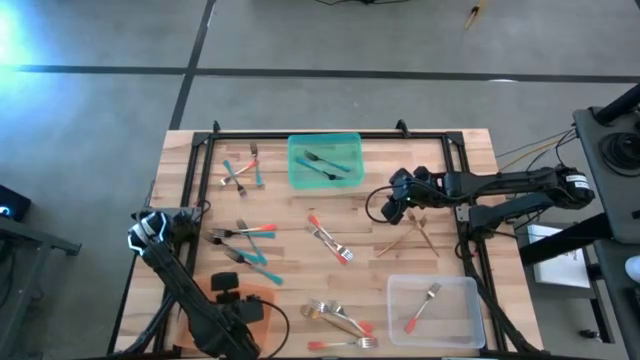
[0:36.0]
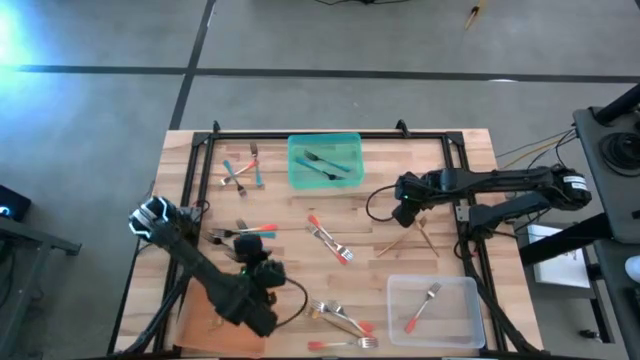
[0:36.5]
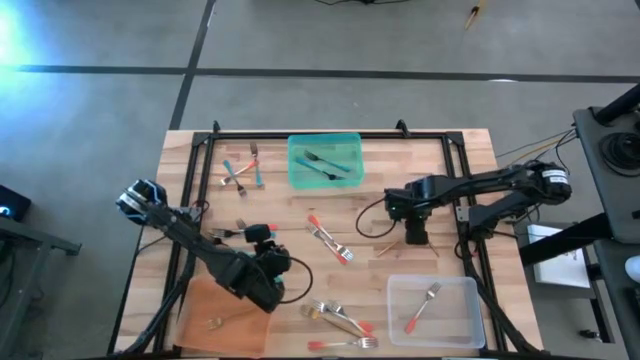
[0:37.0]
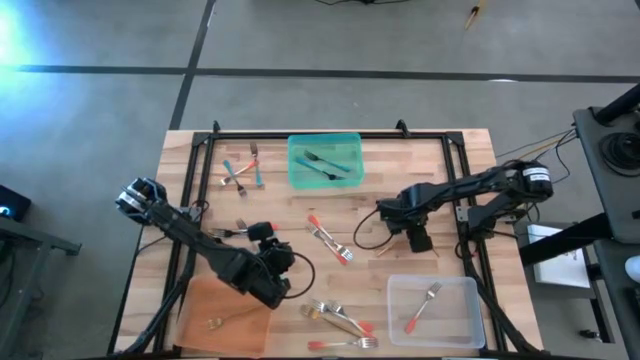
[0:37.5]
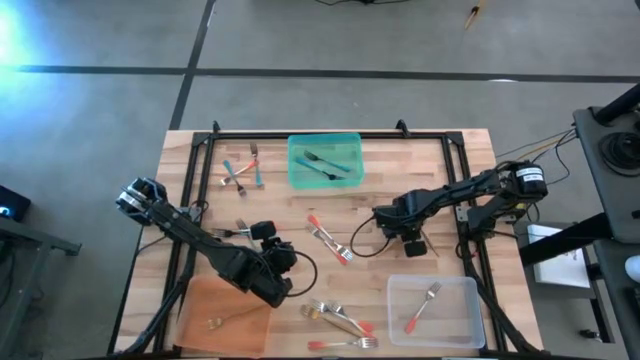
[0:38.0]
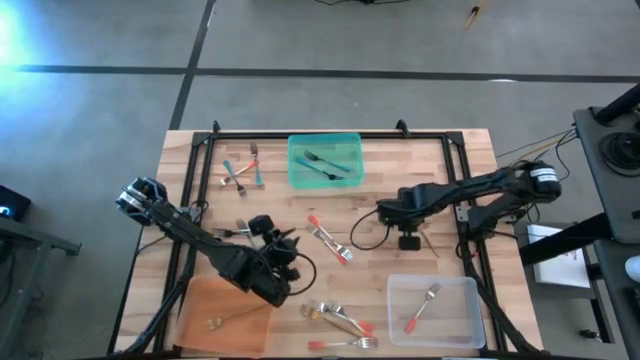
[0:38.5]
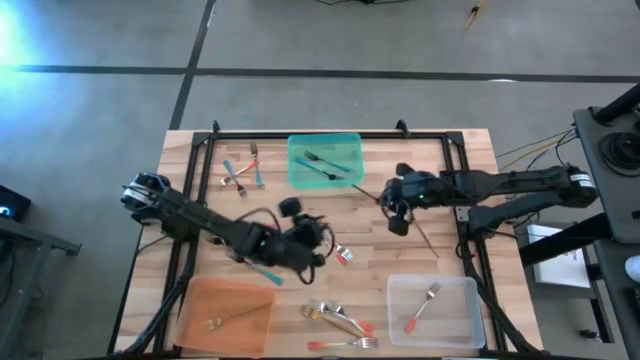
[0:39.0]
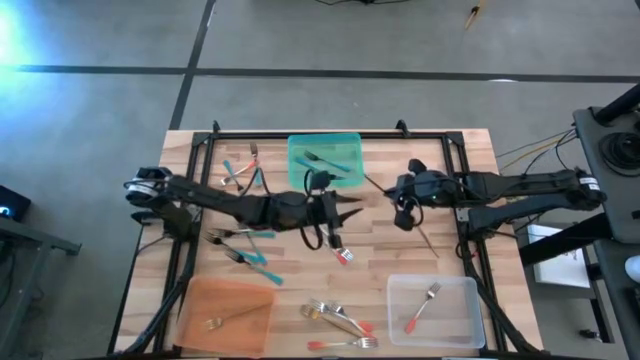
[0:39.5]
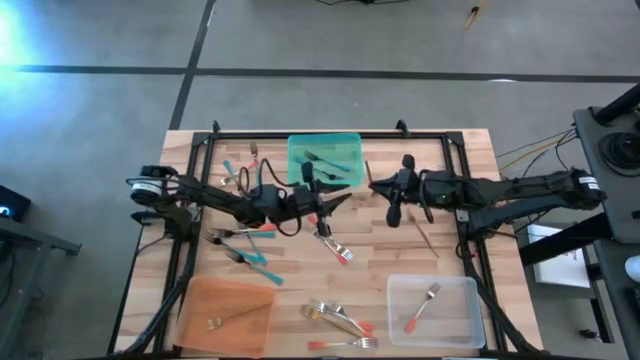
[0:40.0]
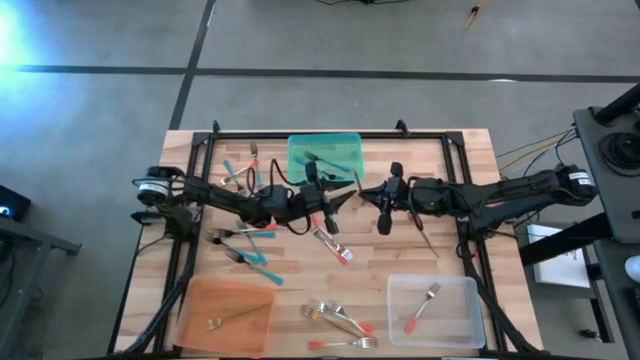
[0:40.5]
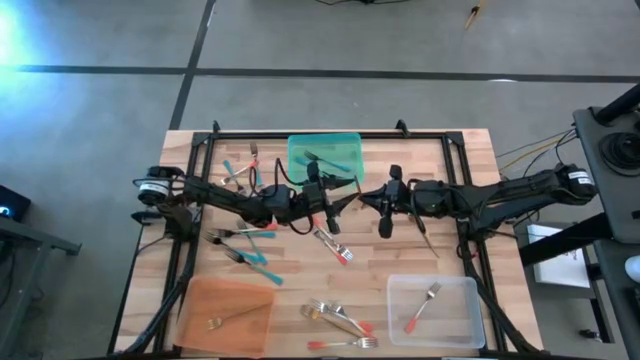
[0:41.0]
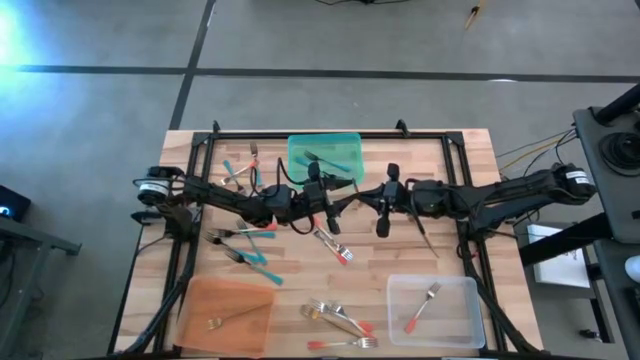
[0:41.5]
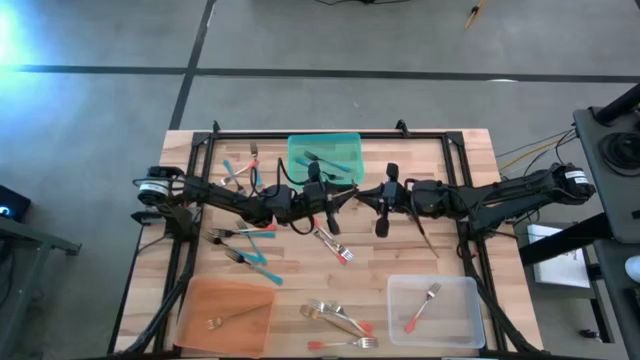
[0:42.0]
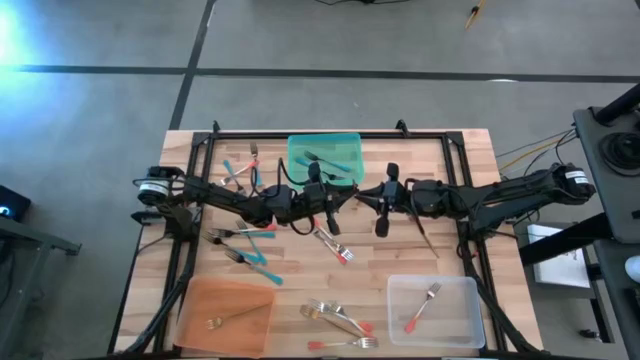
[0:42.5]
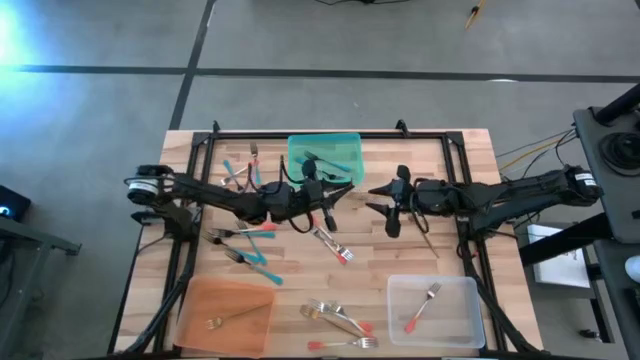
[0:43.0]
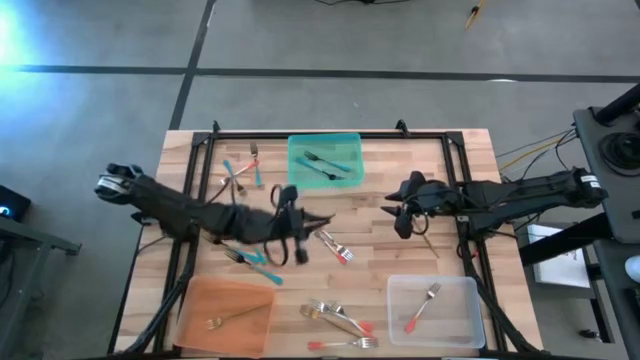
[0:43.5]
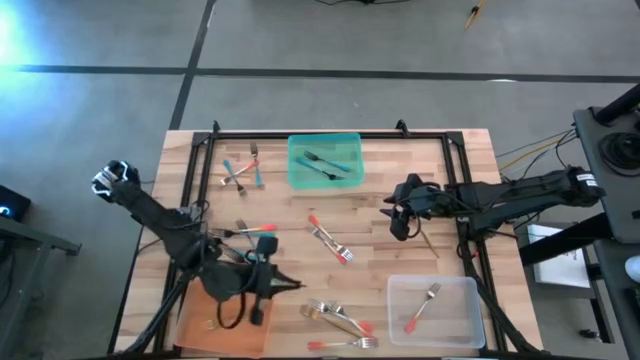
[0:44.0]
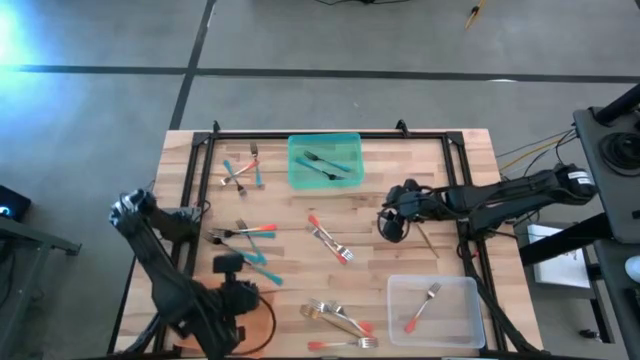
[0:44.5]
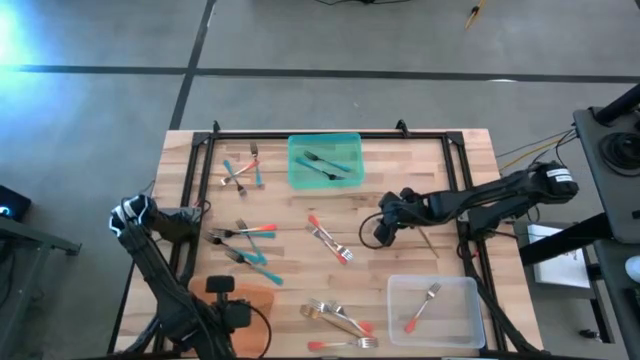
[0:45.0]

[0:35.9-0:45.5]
Task: Sort silverware by color (type)
Put the gold fork into the orange bin

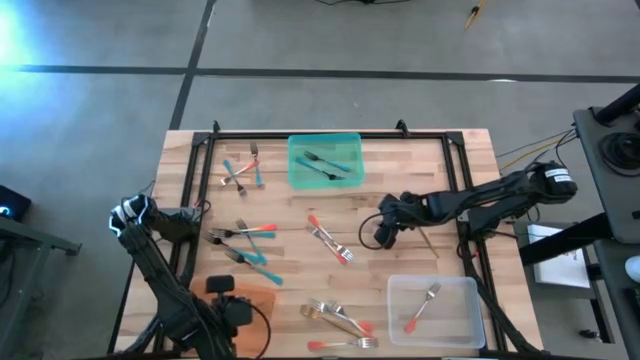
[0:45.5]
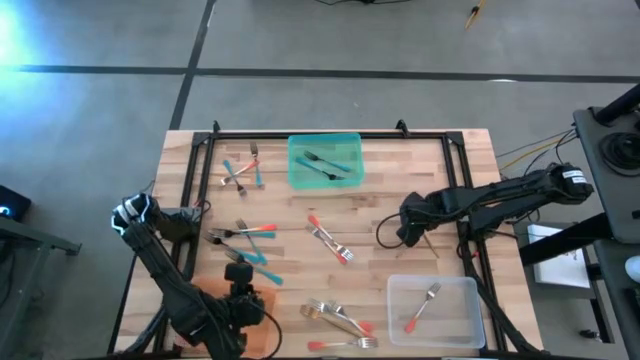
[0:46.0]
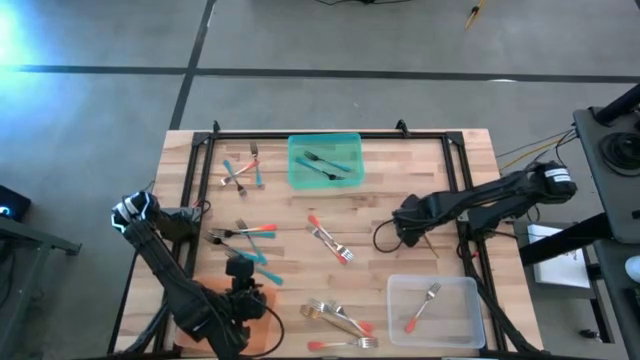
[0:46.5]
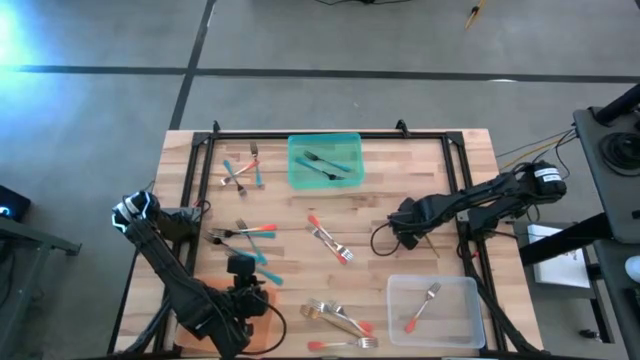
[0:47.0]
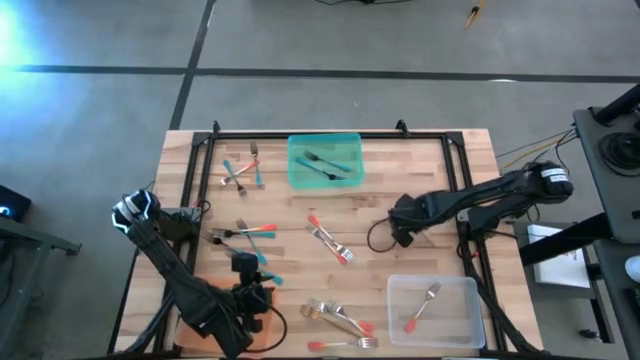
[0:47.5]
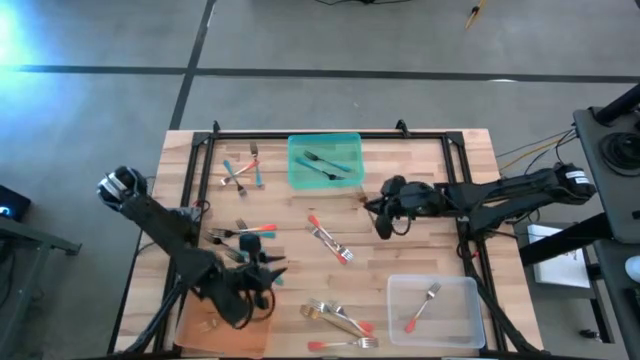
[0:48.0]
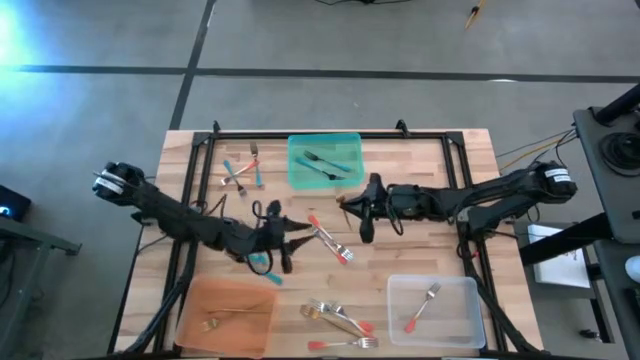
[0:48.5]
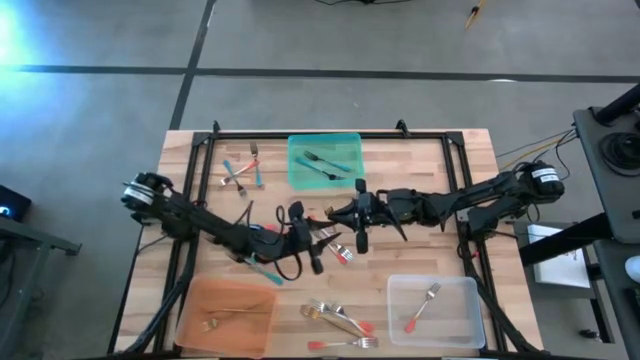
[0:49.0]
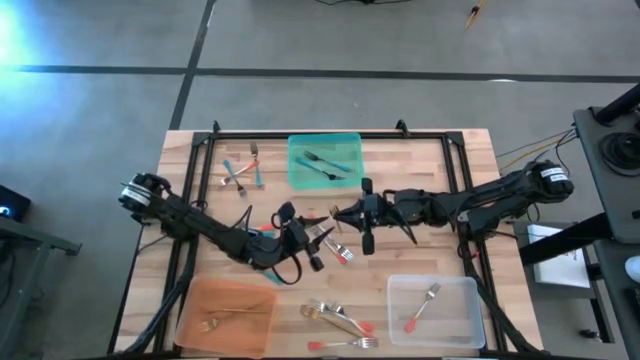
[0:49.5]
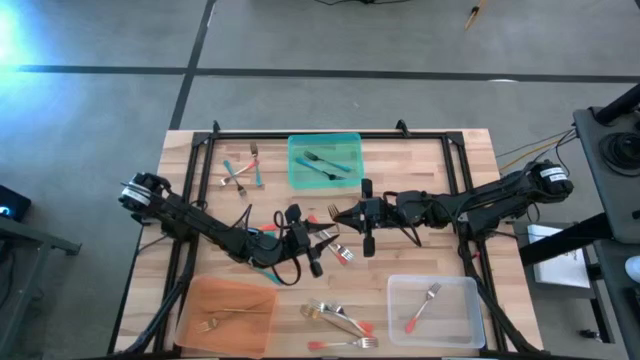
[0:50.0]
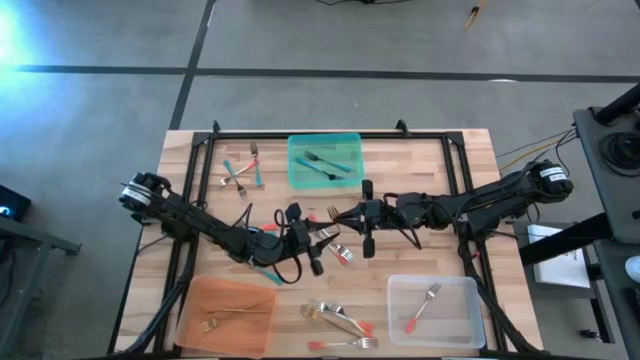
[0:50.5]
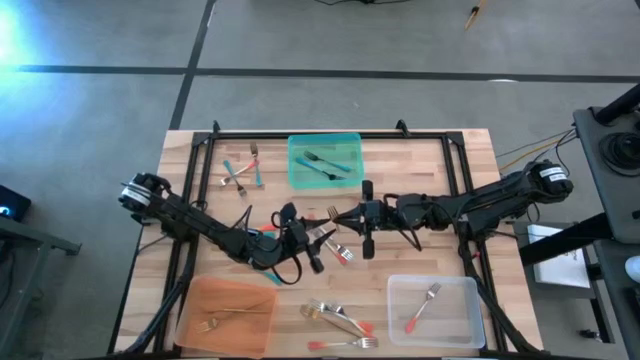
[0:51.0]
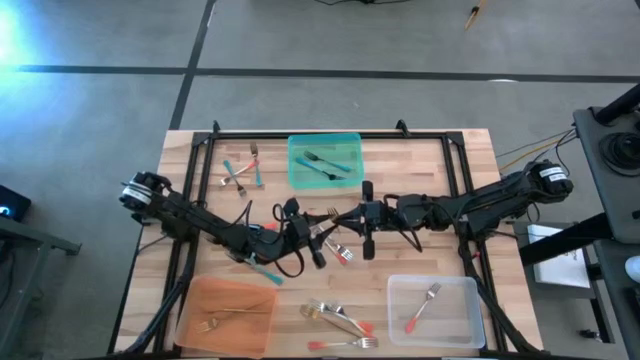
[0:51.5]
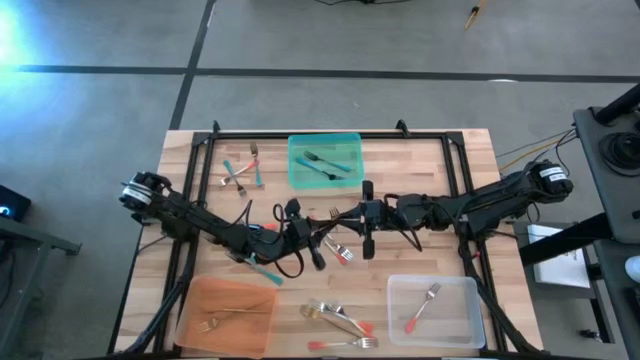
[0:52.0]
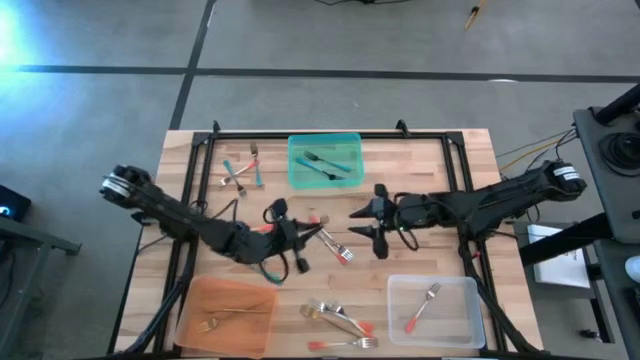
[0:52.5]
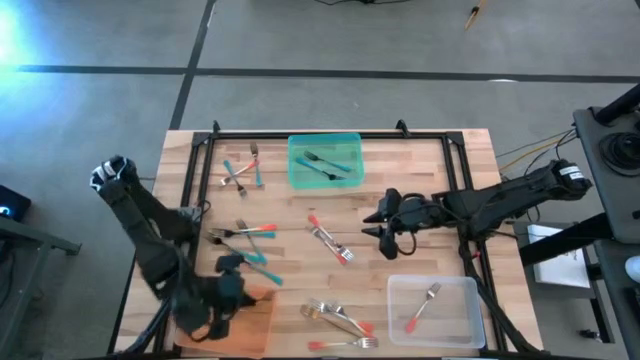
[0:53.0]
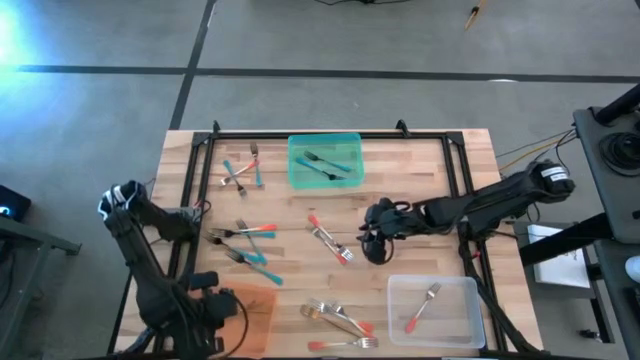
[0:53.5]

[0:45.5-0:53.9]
Put the gold fork into the orange bin

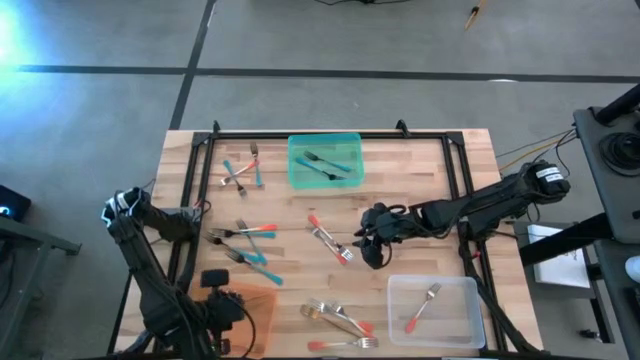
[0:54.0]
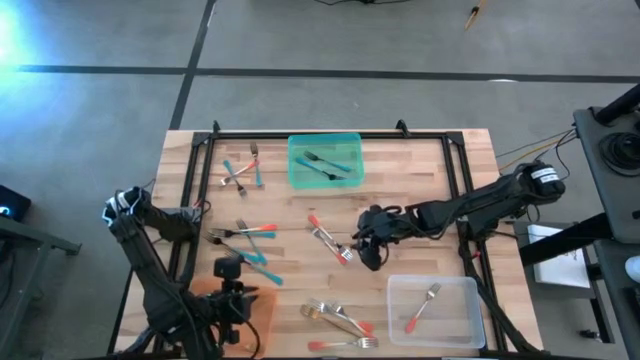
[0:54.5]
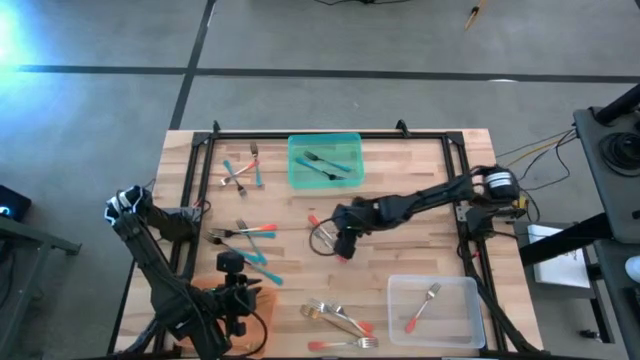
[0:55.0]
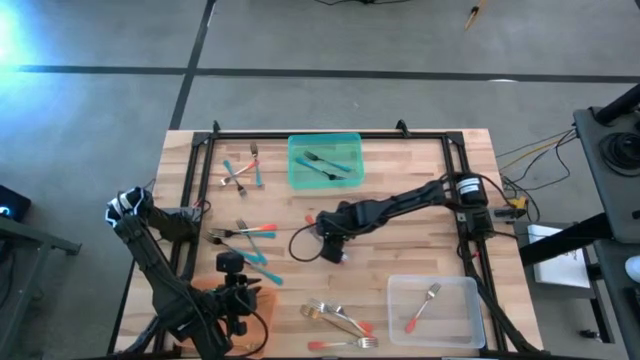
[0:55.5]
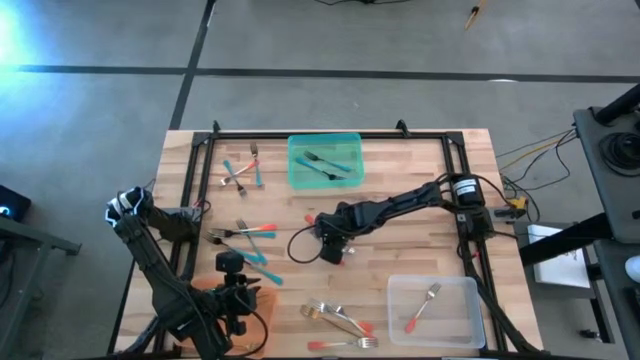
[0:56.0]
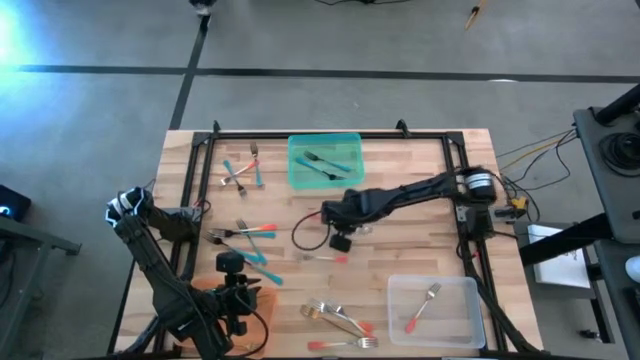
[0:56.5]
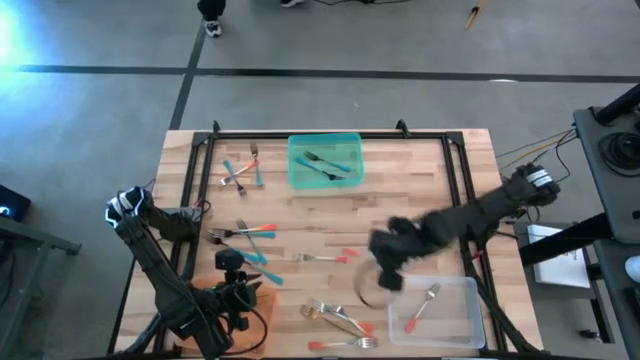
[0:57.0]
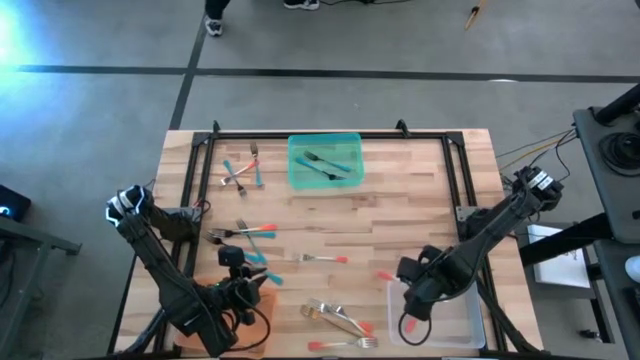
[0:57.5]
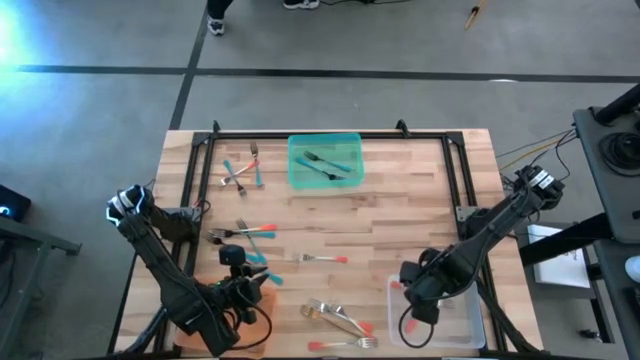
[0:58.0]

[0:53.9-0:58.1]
Put the orange fork into the transparent bin
